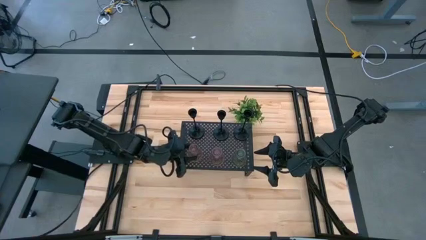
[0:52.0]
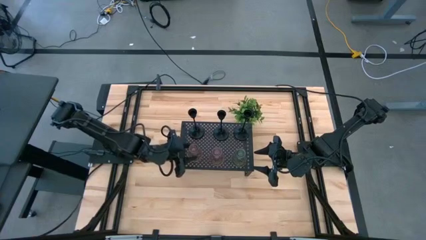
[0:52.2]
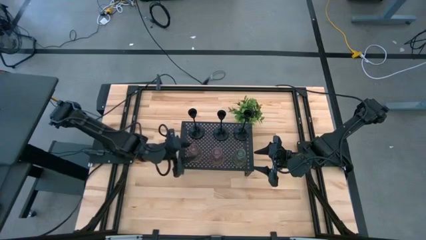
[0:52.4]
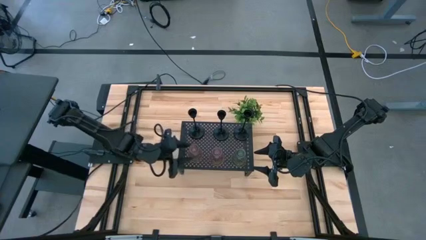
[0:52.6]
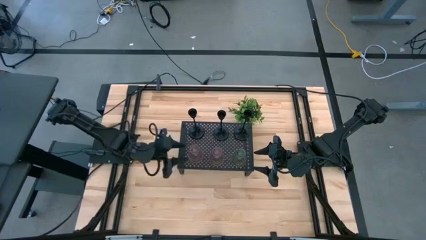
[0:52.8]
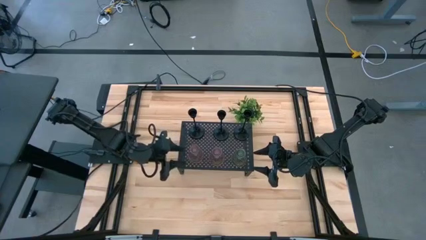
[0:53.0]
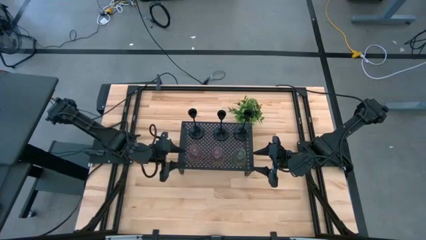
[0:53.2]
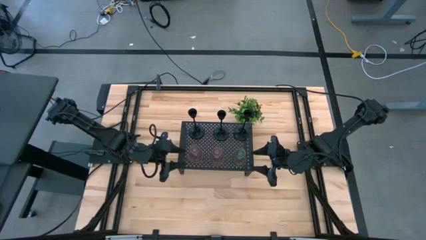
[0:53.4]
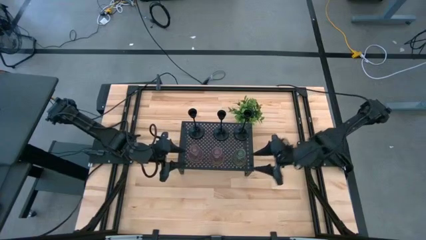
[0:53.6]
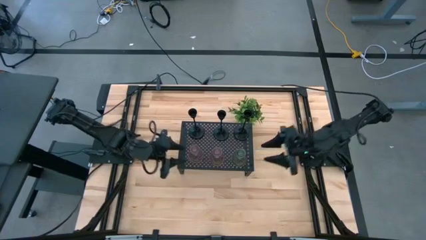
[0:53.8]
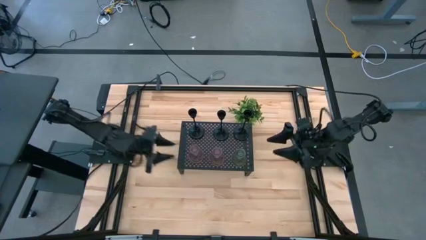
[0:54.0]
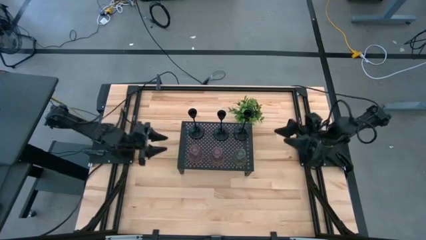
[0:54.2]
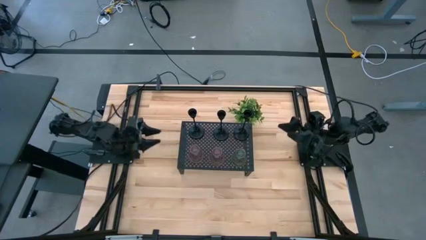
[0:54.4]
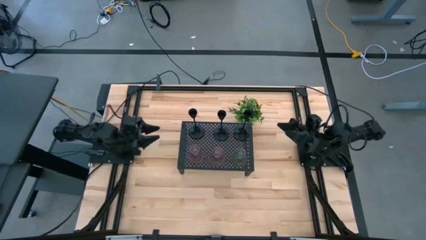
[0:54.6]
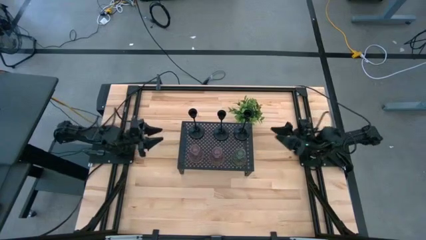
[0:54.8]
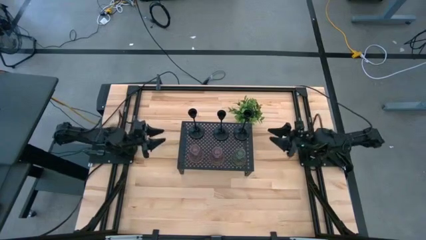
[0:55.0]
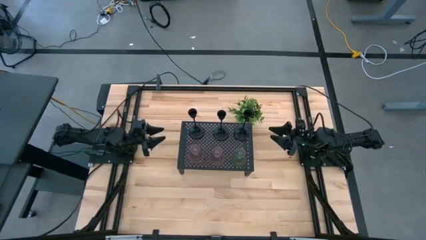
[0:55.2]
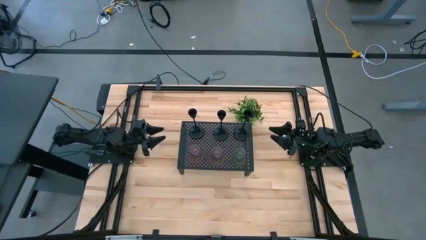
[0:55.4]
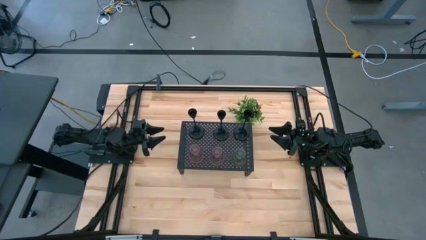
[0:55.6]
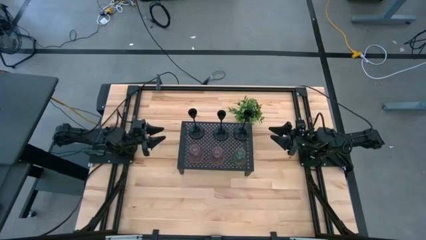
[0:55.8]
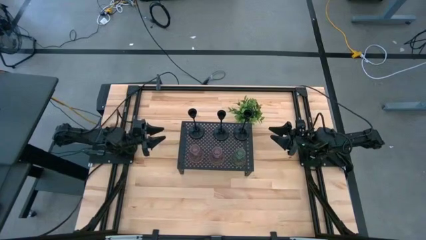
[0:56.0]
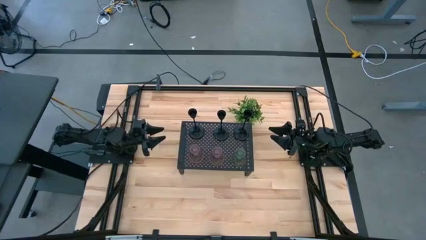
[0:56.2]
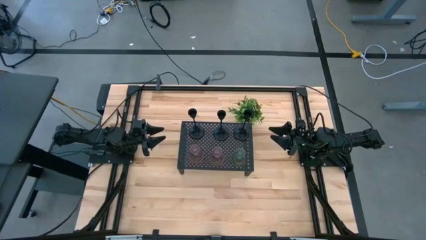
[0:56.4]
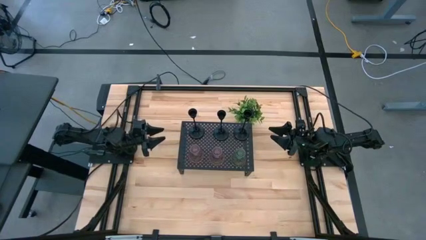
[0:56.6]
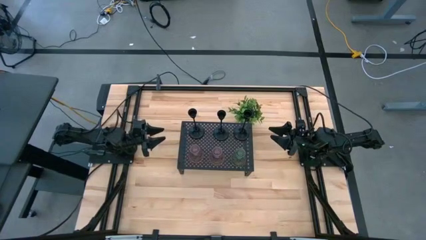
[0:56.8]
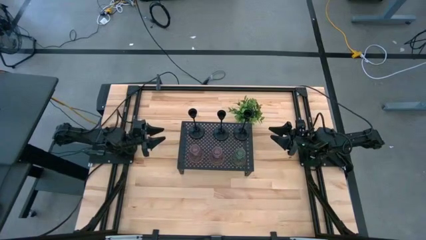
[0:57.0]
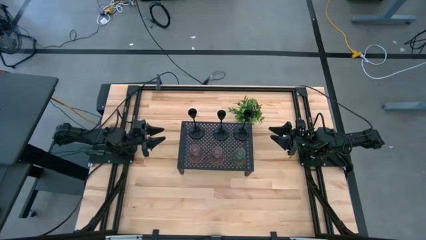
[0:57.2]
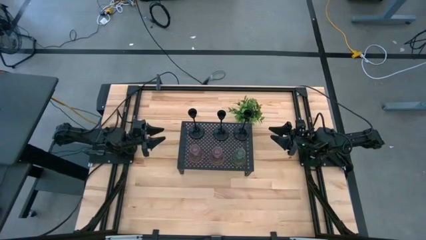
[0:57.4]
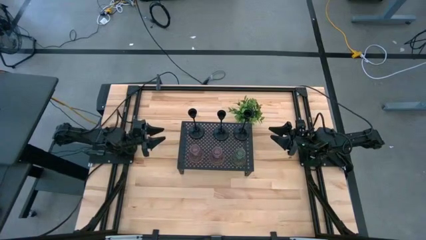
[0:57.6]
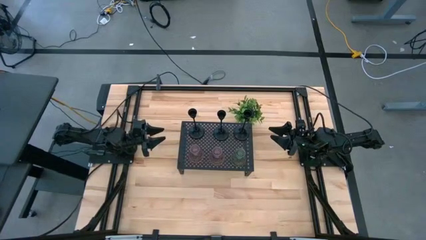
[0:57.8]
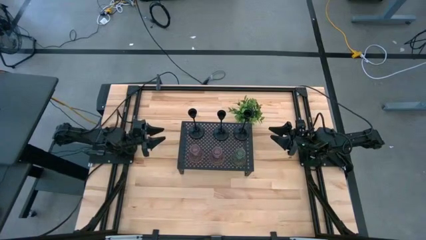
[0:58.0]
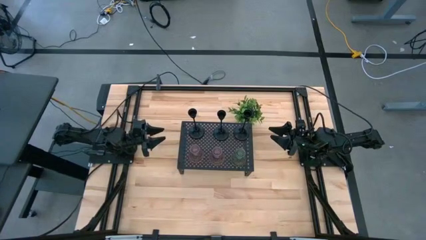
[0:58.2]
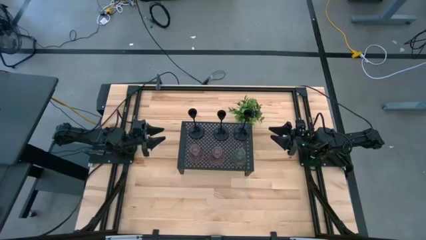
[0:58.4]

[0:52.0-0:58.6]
Task: Pick & Place candle stick holders
Return to home position

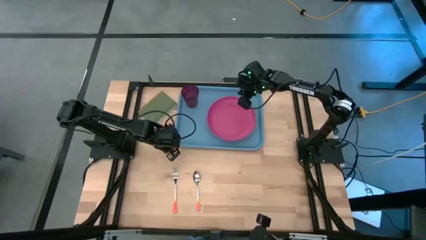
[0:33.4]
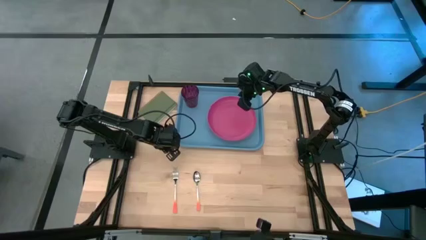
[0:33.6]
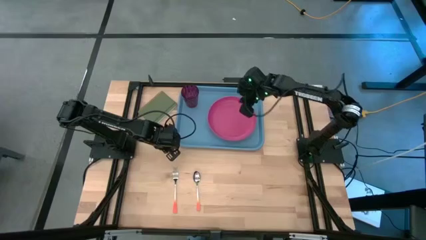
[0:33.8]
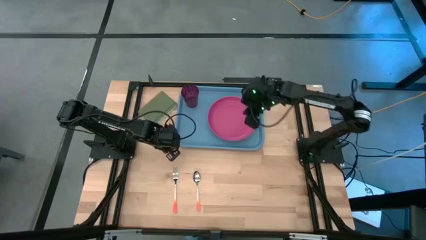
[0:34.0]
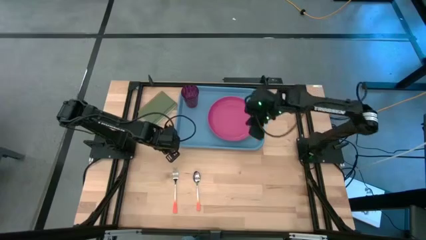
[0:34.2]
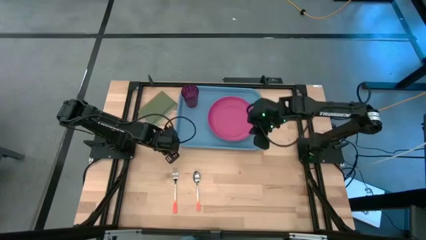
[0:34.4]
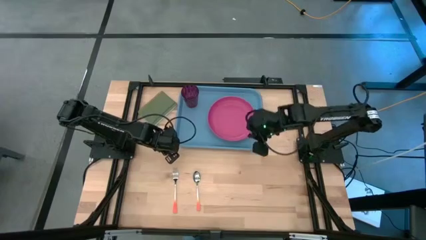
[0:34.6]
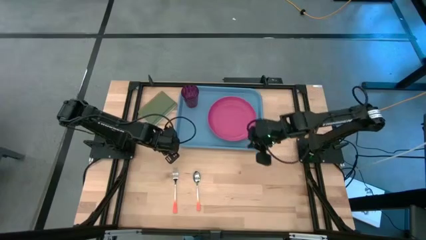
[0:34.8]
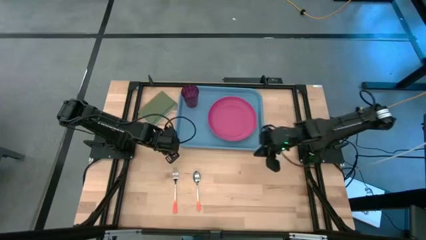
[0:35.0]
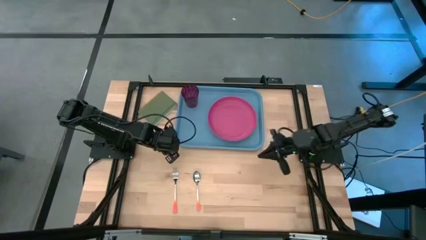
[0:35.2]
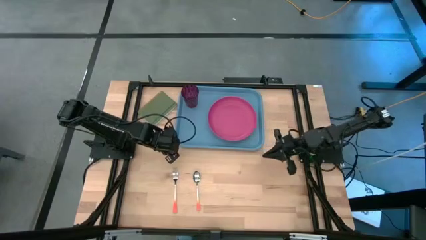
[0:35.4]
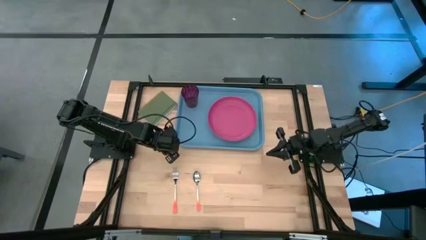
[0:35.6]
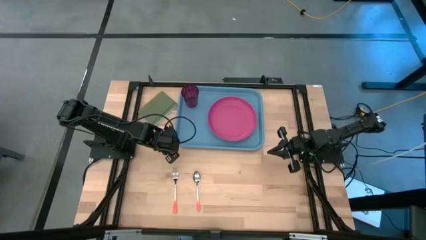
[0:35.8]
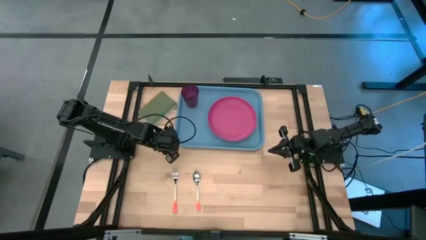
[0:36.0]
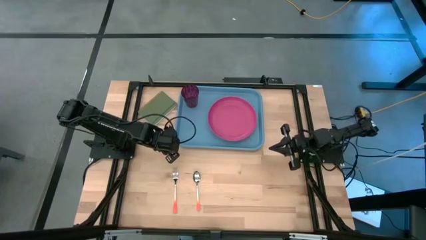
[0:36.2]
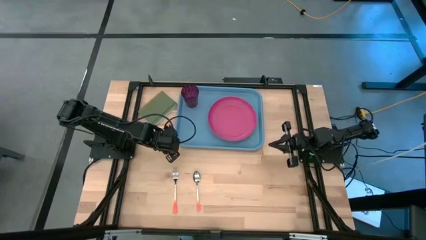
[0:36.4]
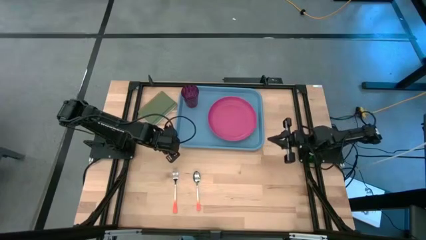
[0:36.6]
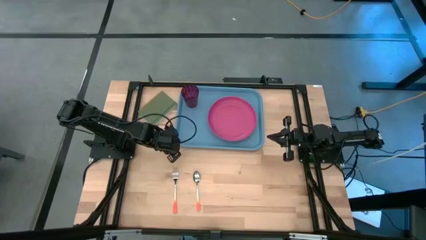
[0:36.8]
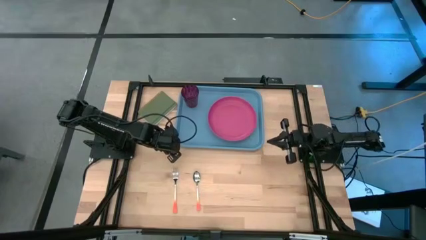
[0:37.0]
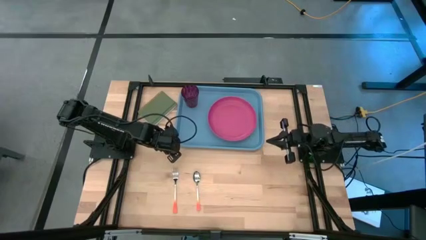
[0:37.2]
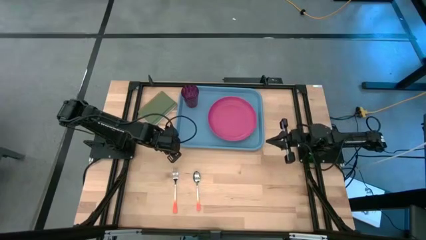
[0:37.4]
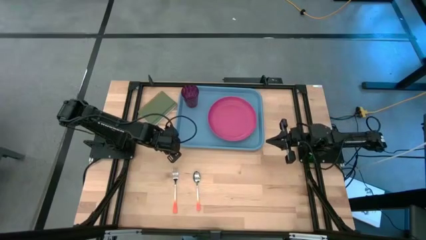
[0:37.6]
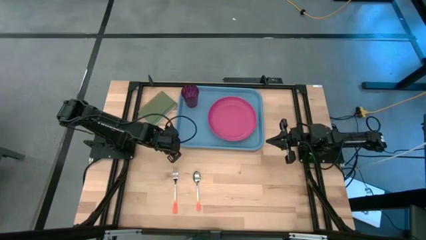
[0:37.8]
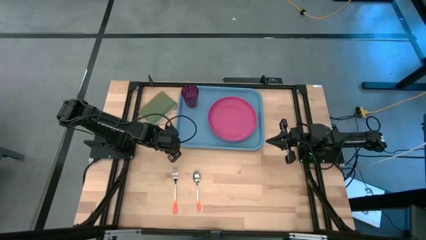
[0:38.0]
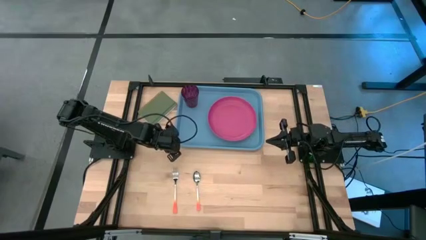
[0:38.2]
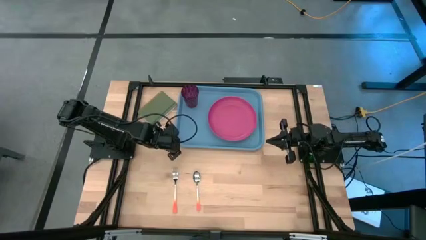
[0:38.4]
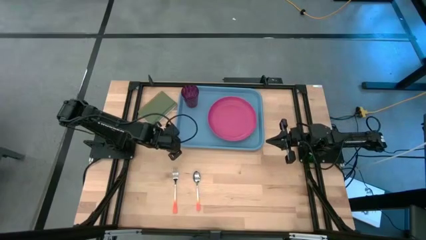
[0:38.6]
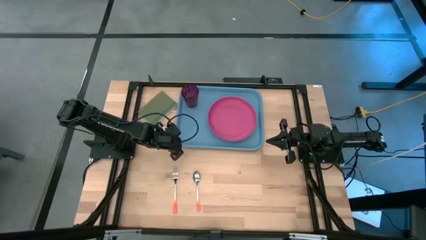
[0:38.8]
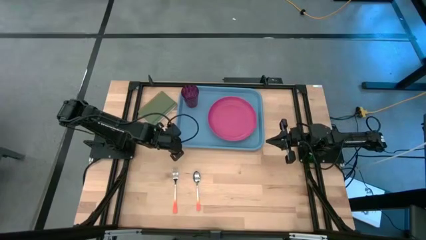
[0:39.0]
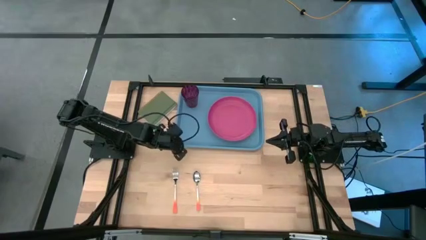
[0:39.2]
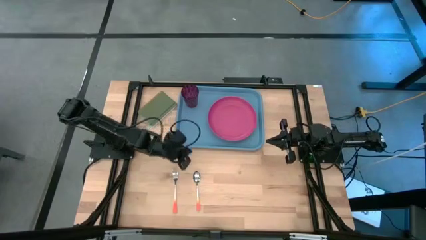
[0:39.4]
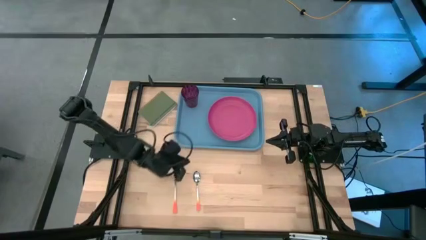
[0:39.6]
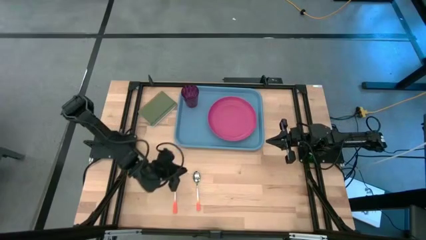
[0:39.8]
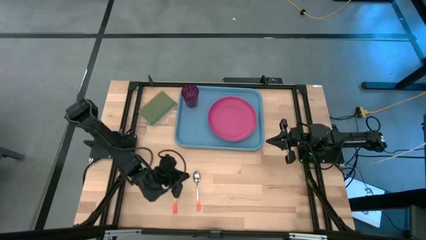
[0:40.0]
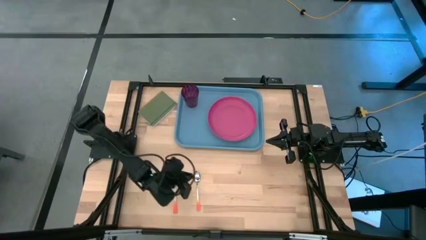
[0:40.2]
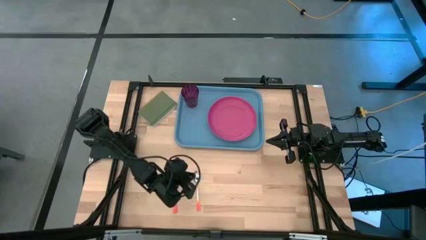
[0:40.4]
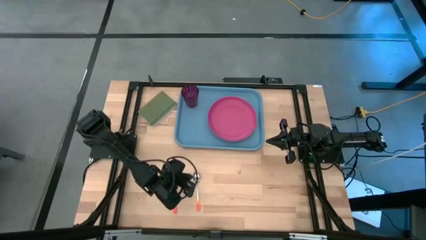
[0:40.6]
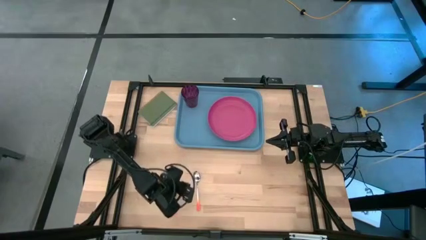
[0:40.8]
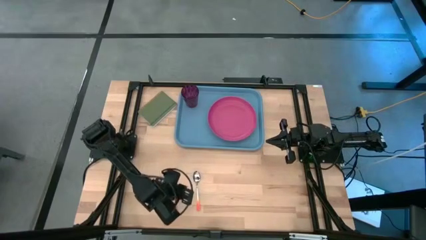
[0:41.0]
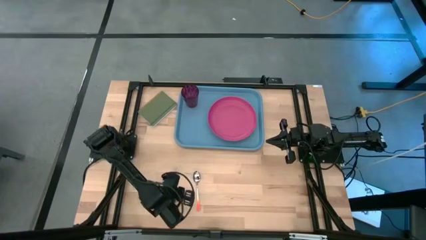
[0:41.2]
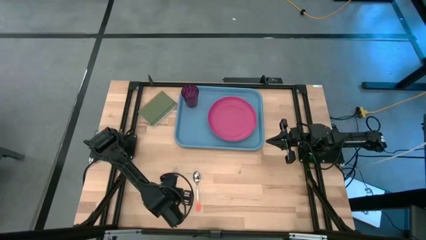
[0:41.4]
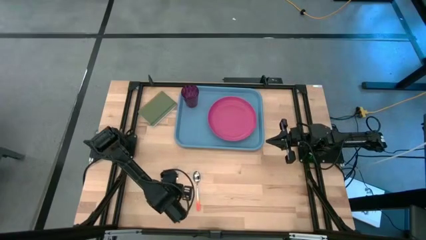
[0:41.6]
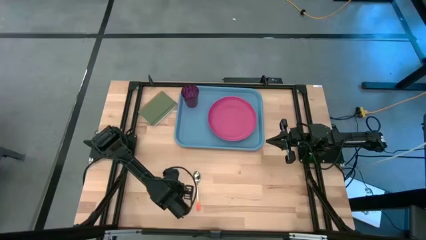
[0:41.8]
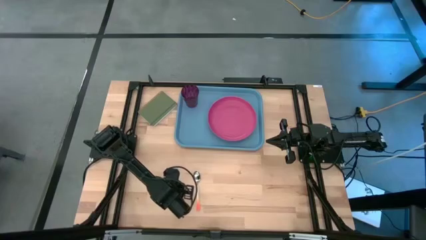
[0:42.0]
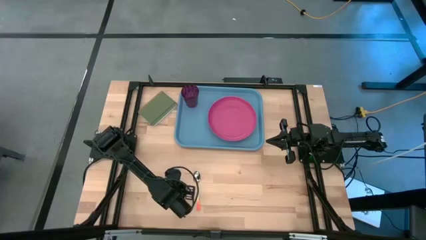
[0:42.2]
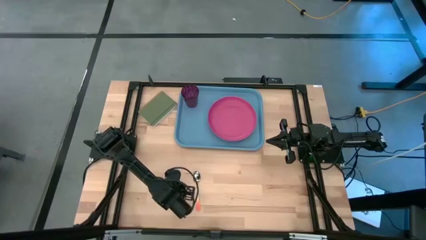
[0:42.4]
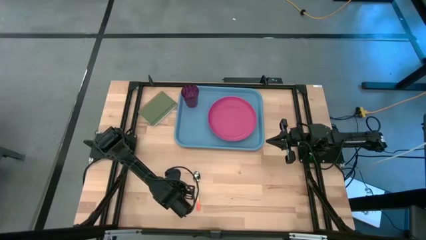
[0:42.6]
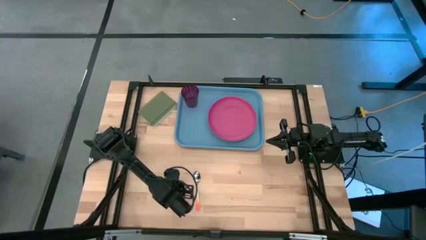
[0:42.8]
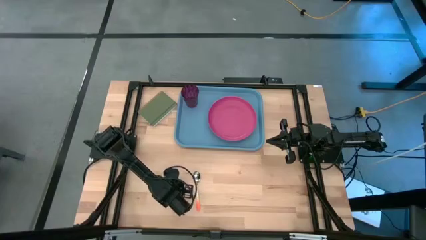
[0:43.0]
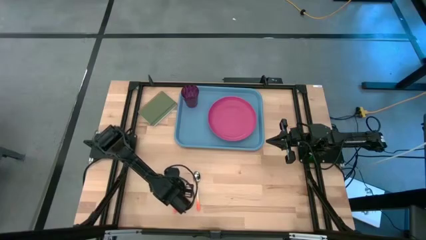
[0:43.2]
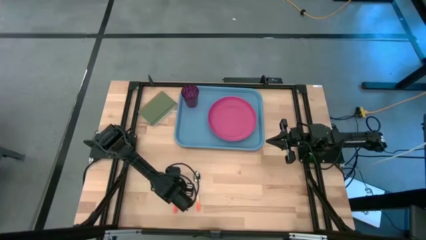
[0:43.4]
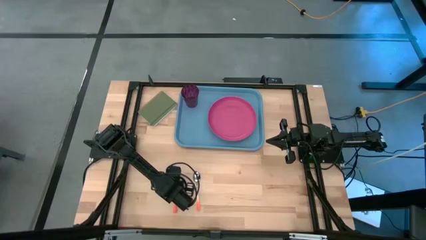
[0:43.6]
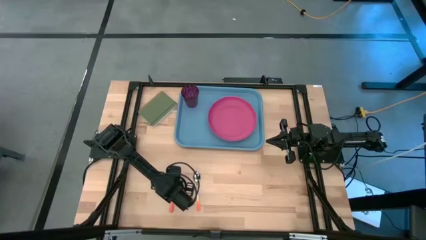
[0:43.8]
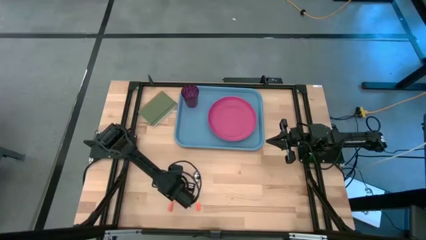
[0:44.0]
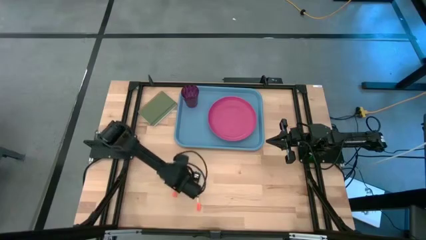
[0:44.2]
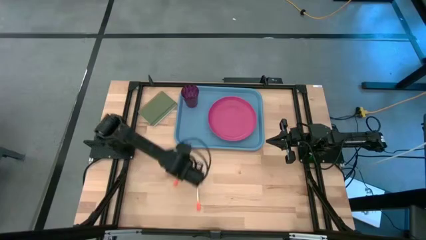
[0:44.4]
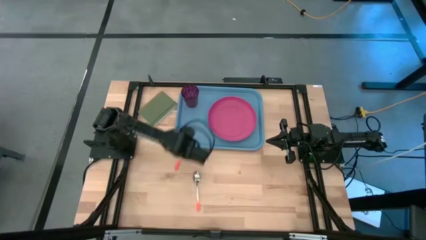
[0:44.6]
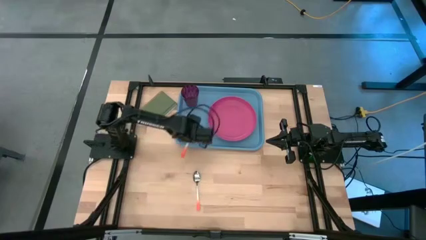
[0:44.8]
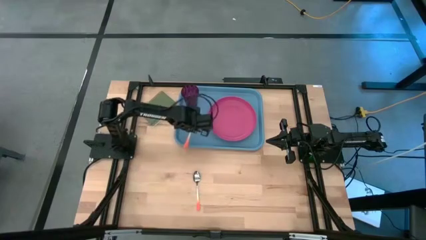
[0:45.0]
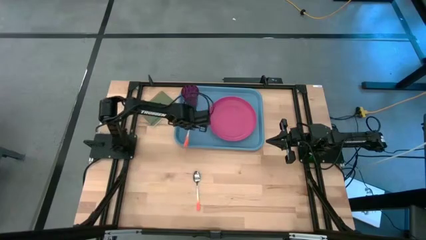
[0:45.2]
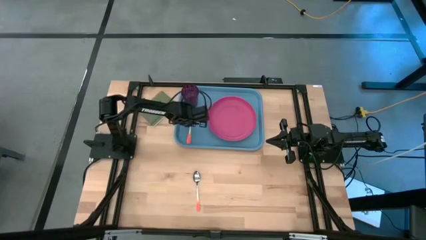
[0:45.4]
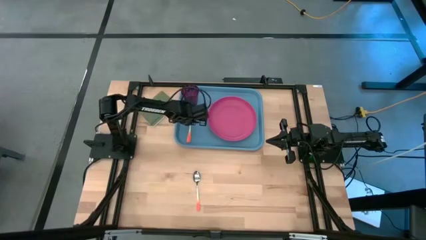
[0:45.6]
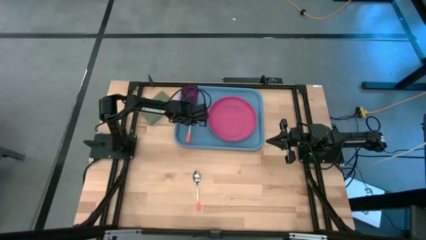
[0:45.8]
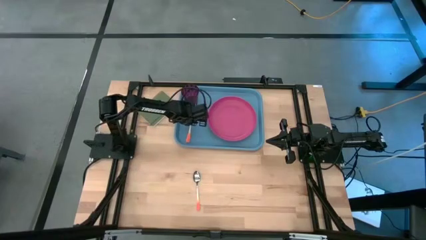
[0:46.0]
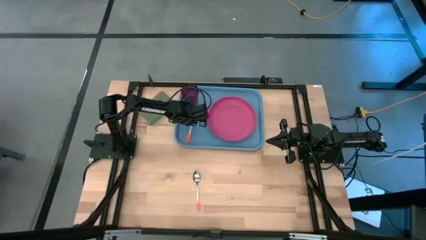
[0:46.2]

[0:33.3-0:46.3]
Task: Pick and place plate/cup/fork/spoon on tray
Put the orange fork below the purple cup on the blue tray
